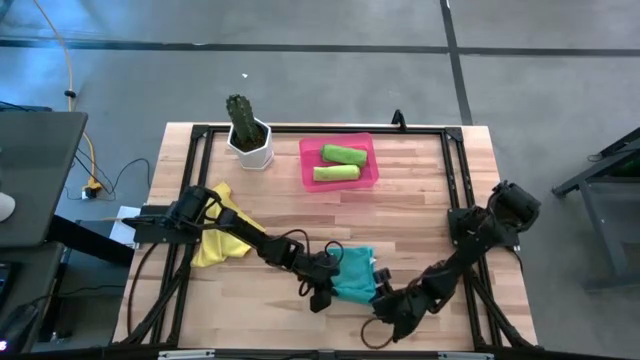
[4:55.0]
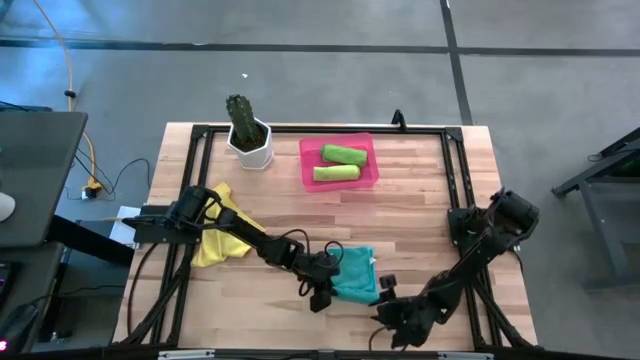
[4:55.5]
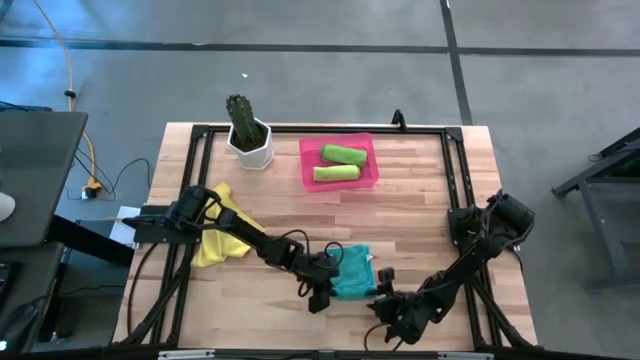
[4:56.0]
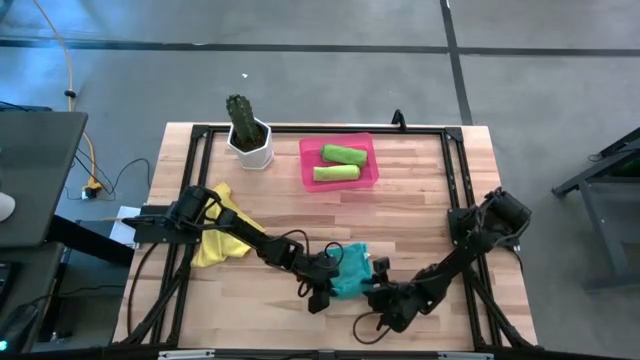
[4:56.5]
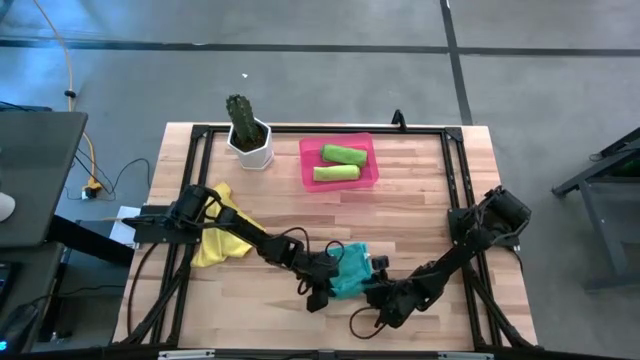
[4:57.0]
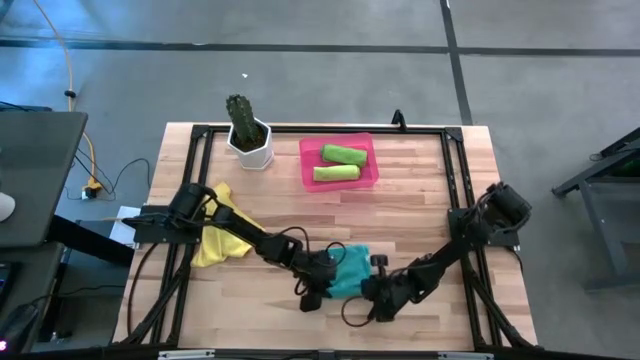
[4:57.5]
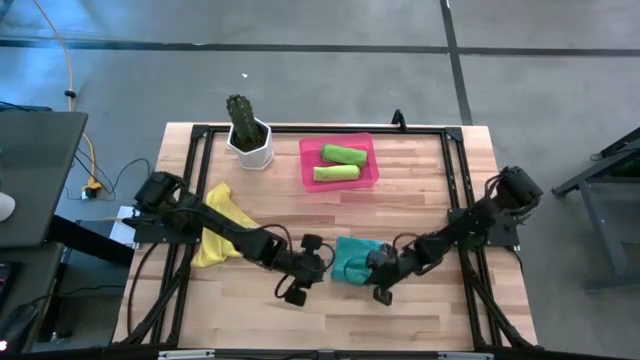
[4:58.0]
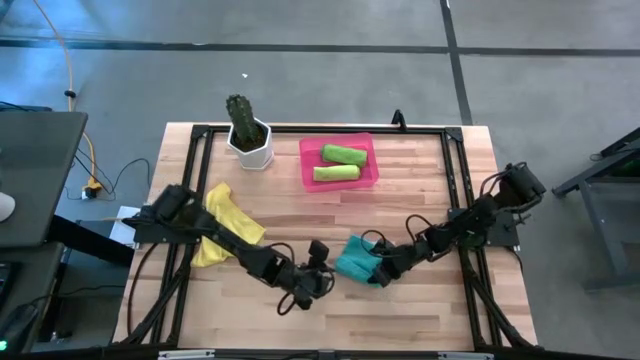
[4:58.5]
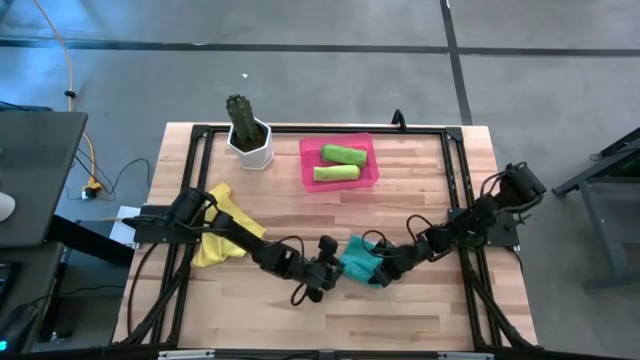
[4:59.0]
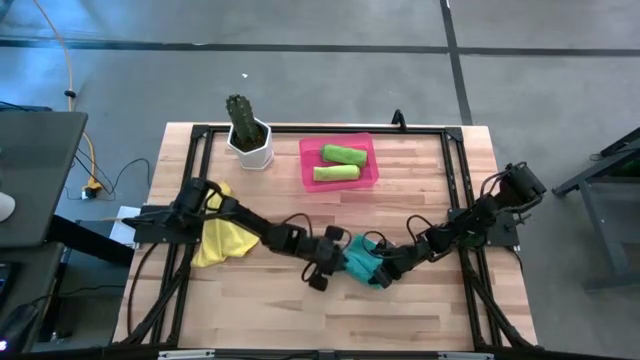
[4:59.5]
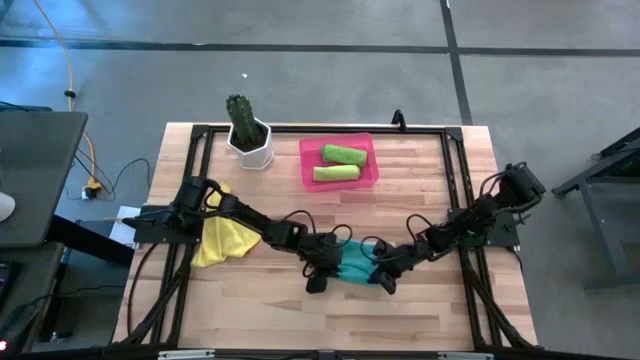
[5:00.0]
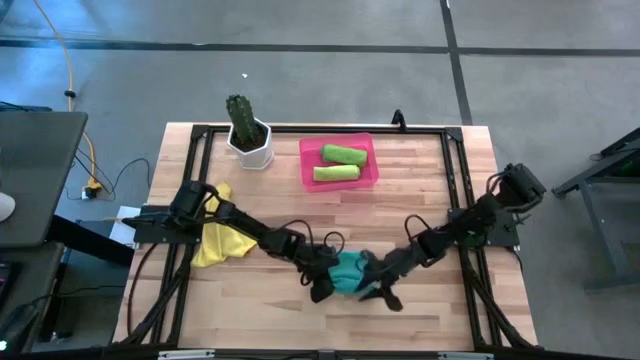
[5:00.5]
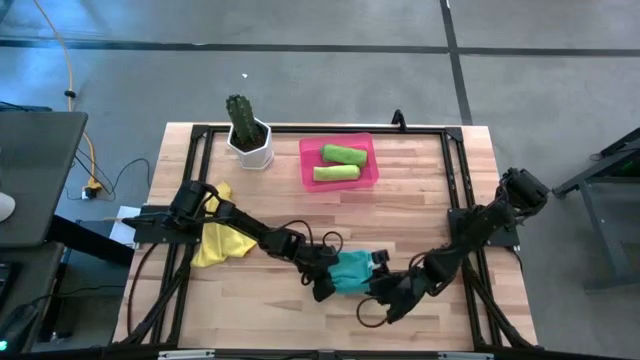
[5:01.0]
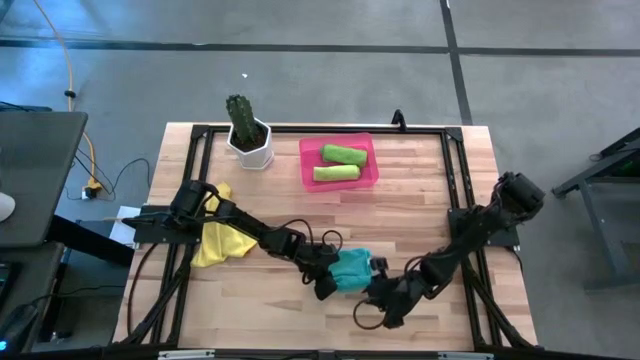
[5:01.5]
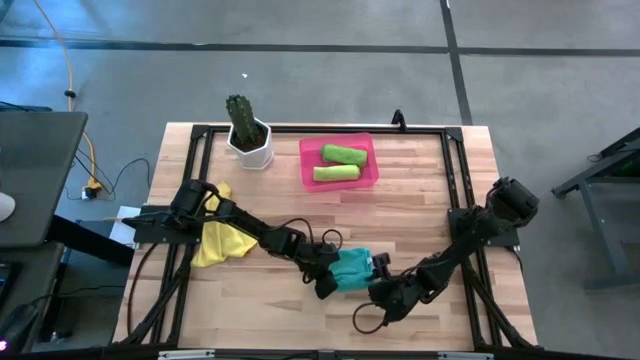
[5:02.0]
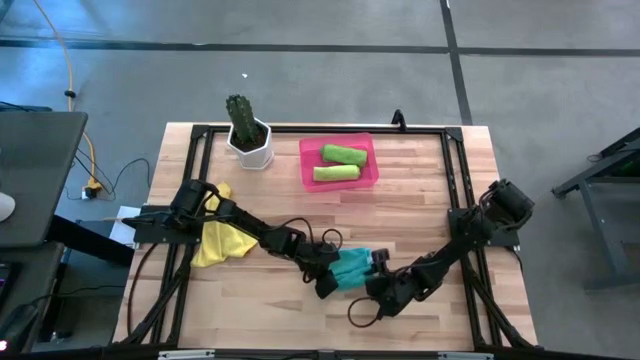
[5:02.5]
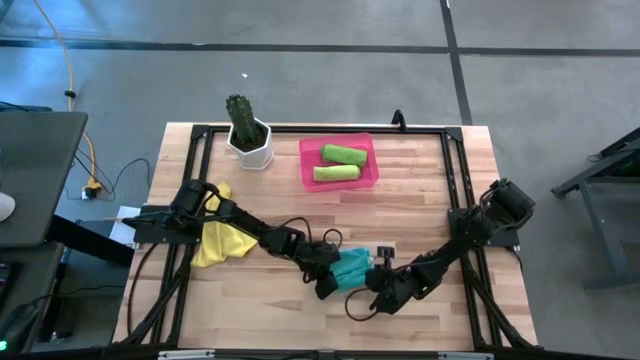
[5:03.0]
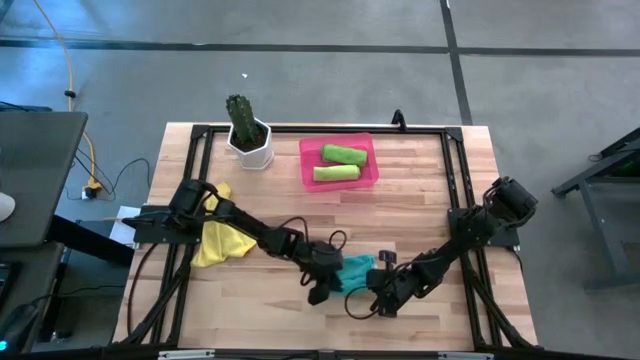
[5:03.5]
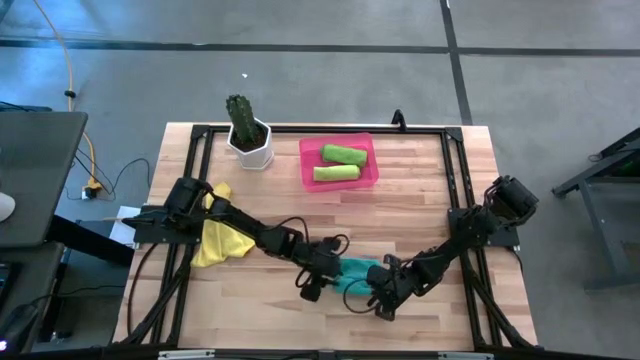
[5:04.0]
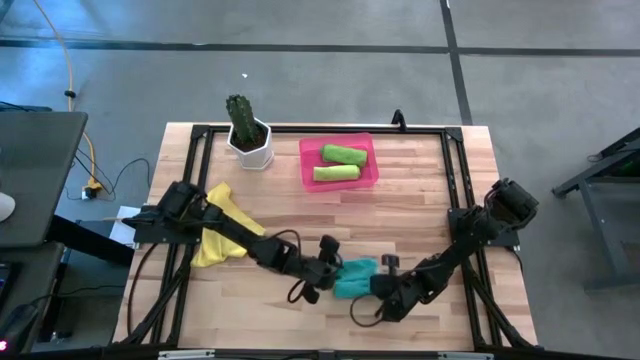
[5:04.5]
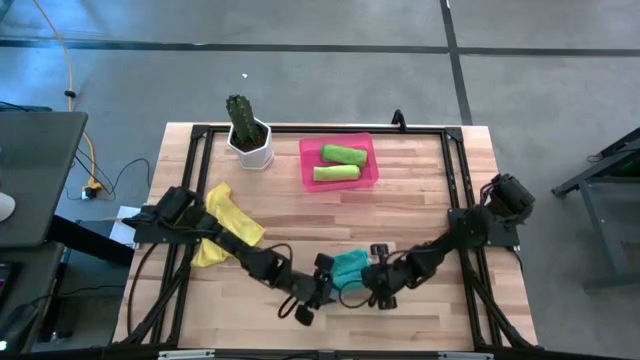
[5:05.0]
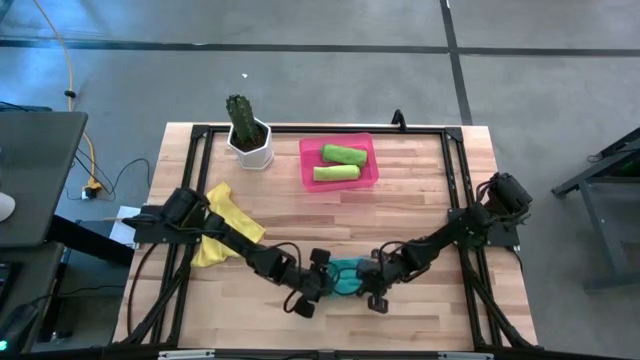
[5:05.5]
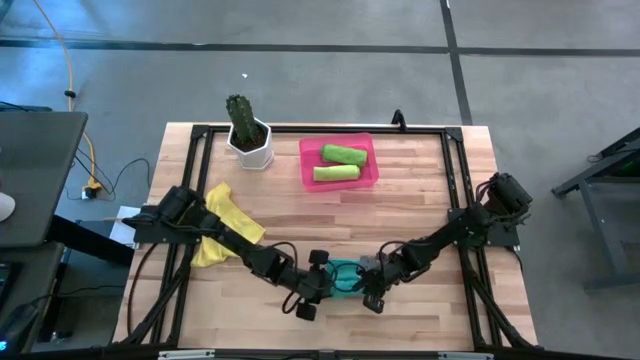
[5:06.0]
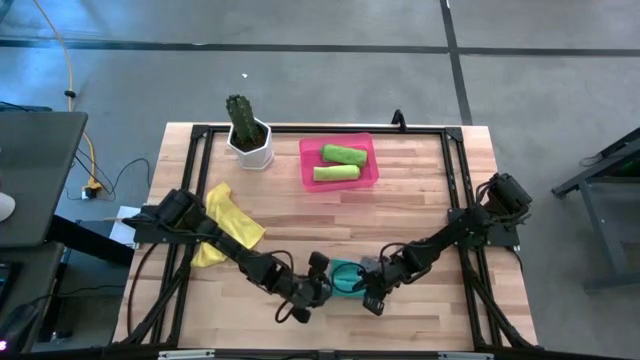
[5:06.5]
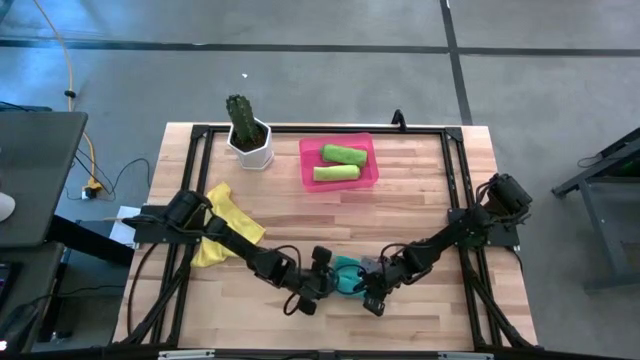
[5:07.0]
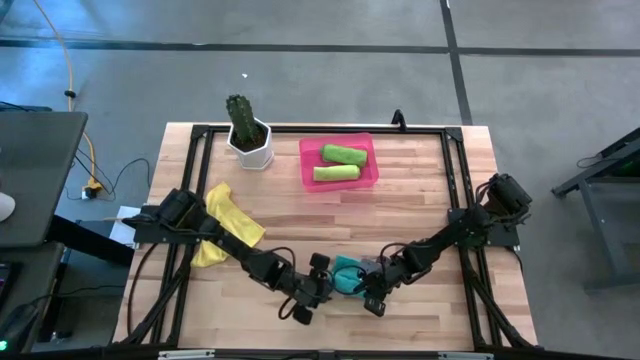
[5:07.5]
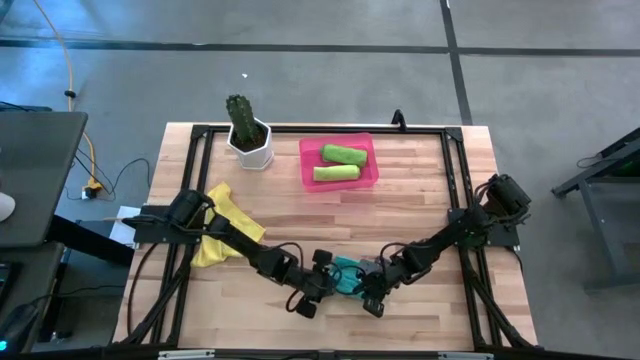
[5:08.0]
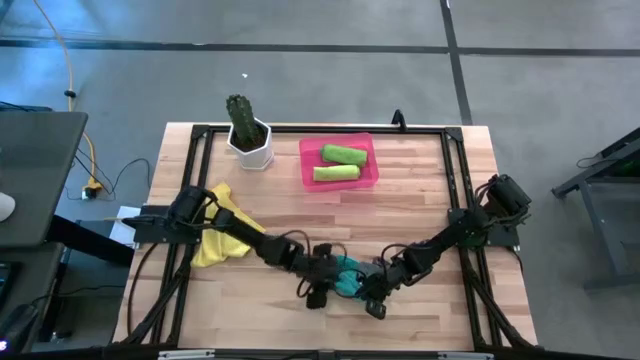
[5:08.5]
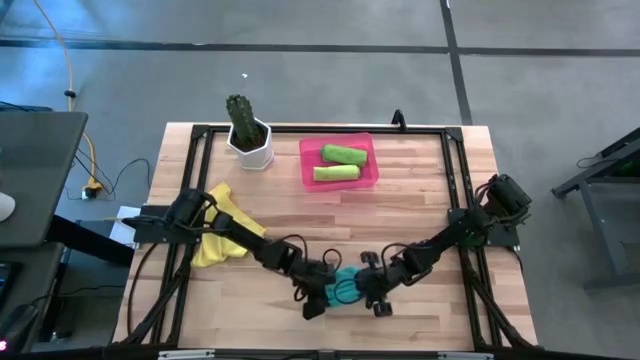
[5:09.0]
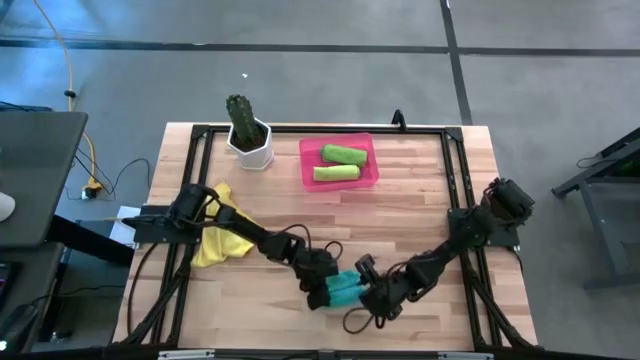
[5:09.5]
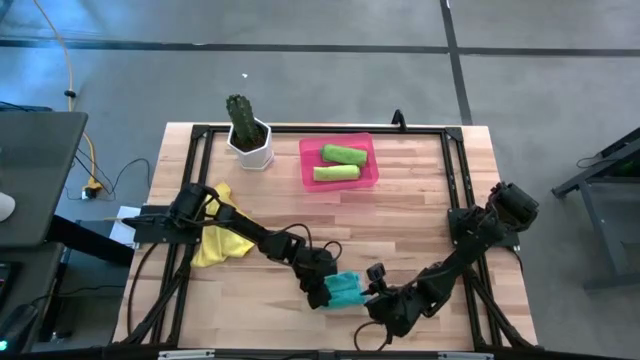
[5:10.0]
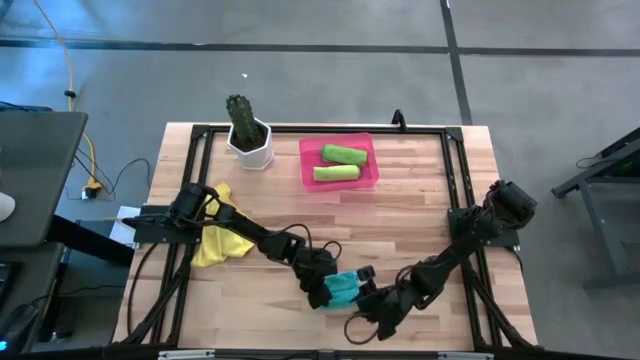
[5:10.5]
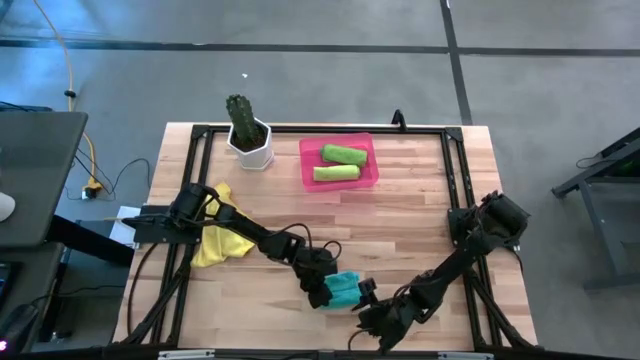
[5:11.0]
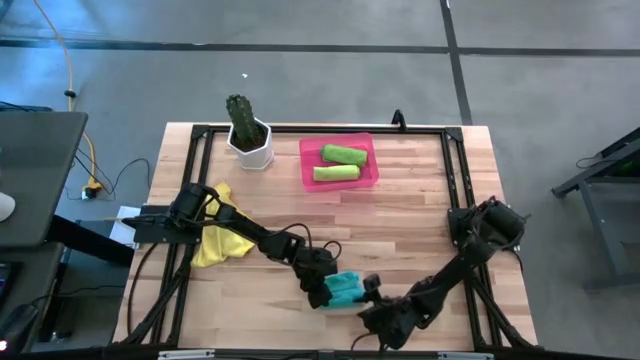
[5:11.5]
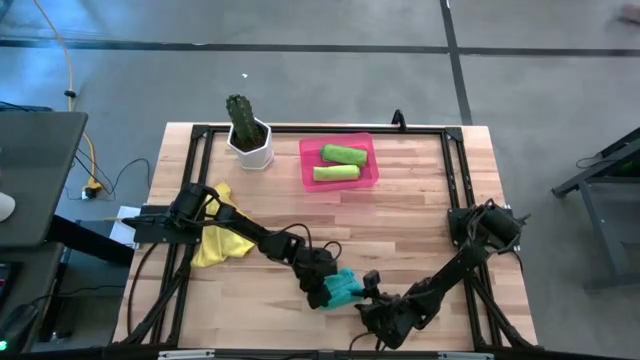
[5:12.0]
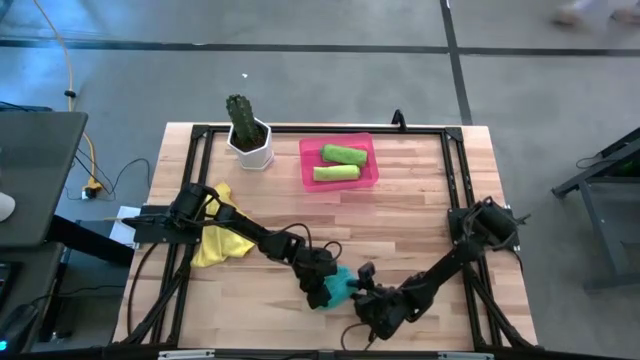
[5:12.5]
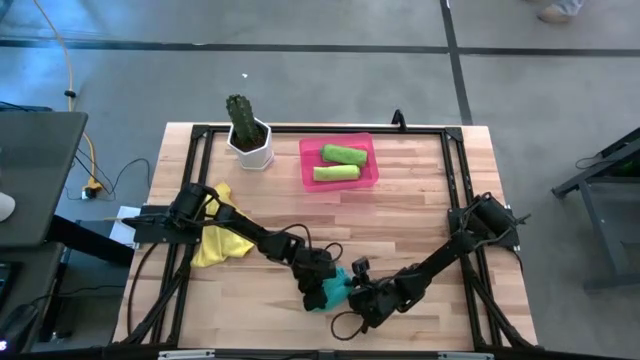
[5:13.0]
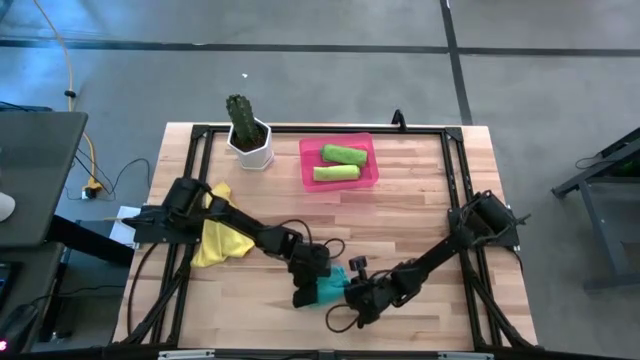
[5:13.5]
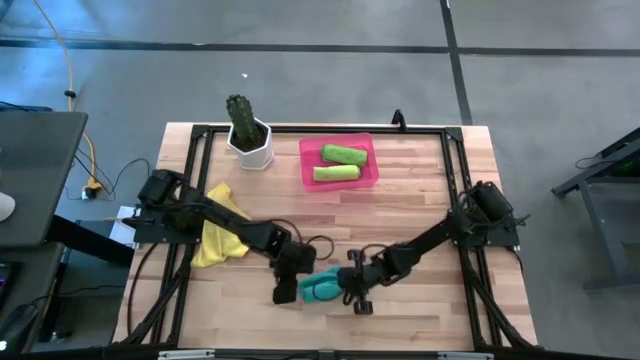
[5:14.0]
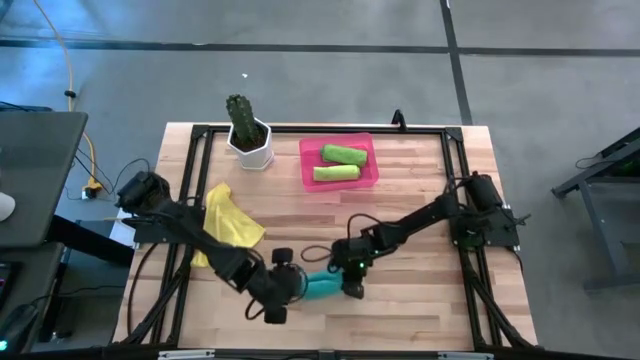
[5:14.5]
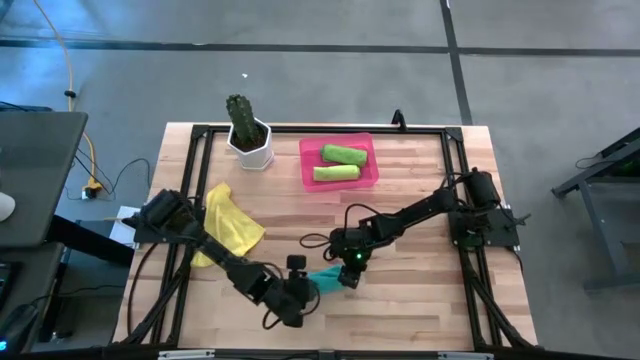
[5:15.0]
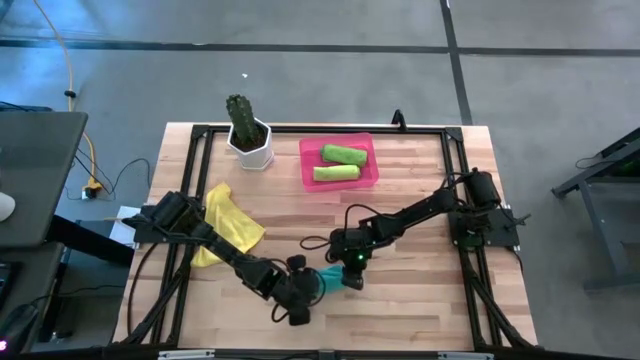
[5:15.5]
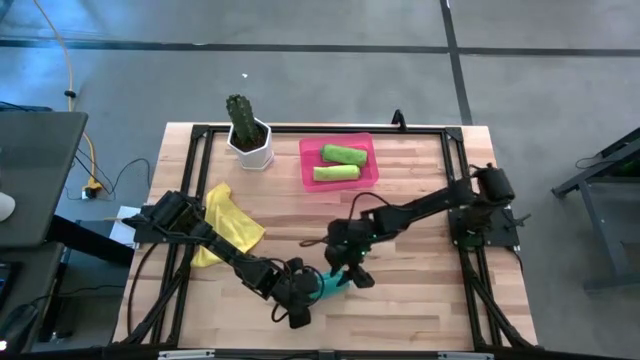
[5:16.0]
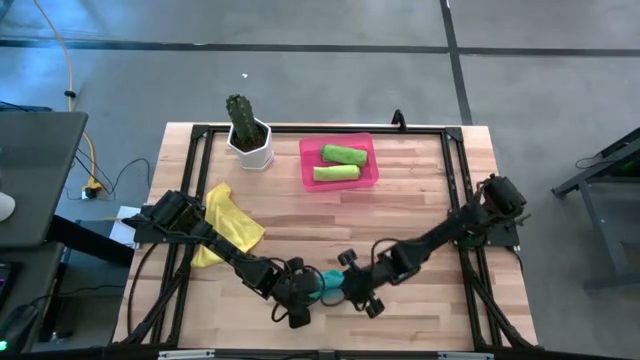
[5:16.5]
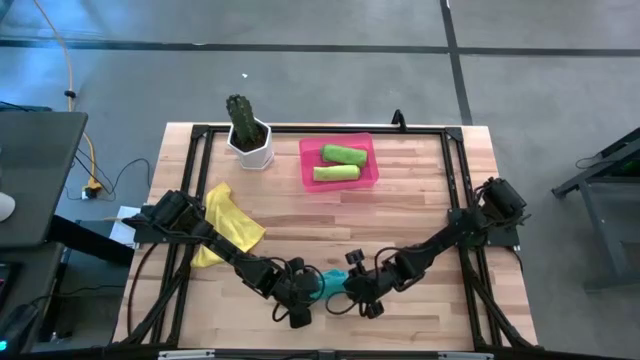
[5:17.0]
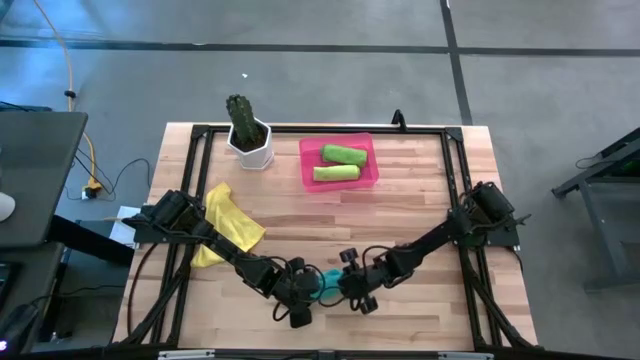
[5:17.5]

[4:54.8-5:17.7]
Task: Roll microfiber towels into tight, uniform cylinder then place into a basket
Roll the blue microfiber cloth
